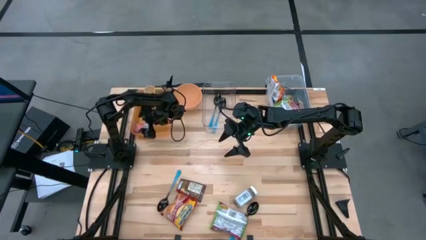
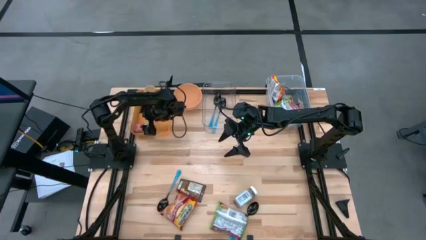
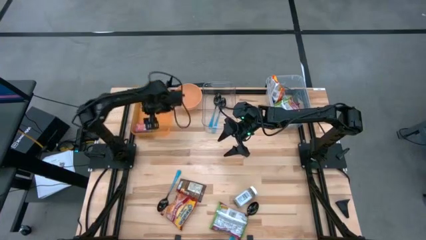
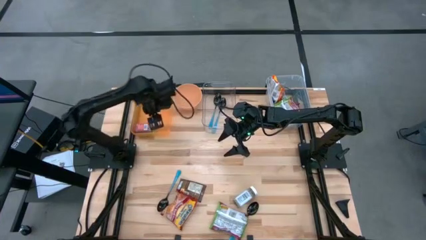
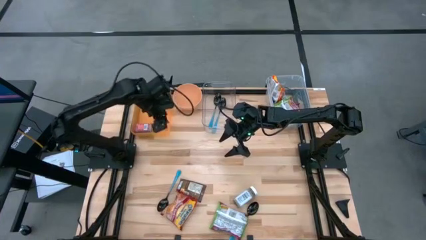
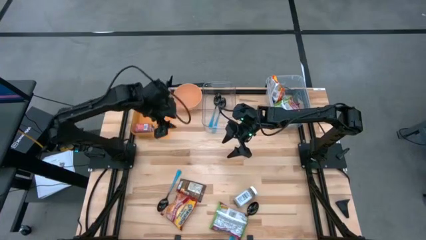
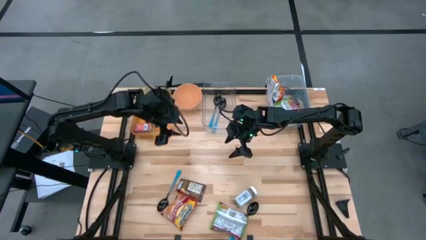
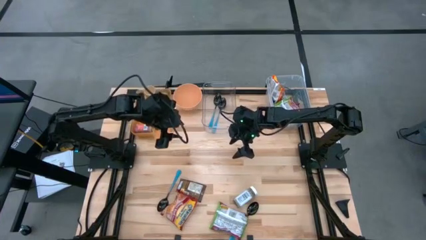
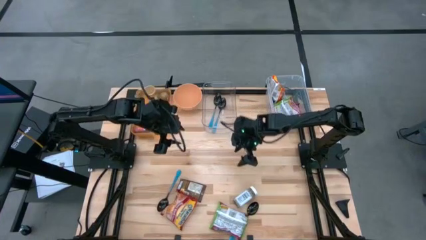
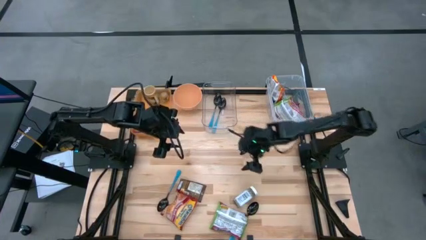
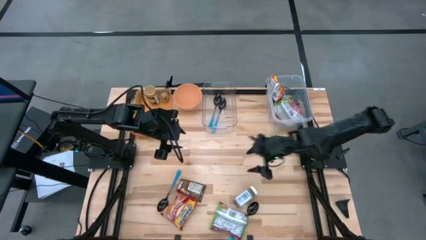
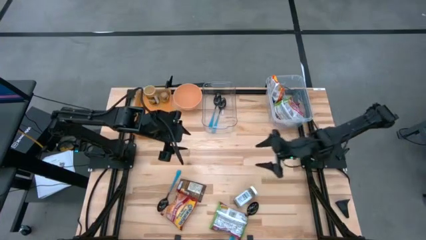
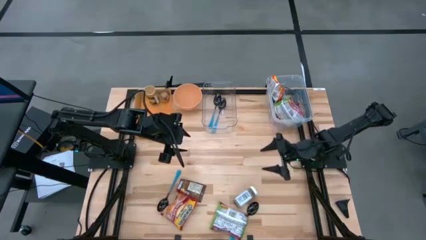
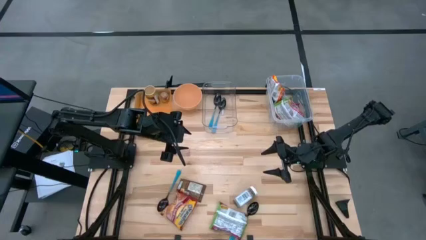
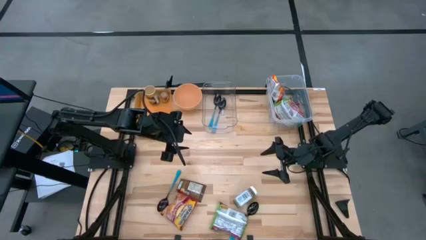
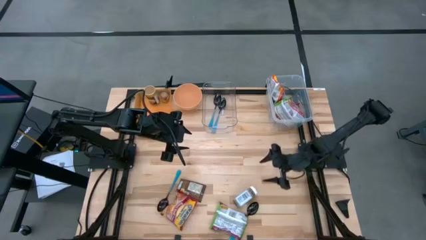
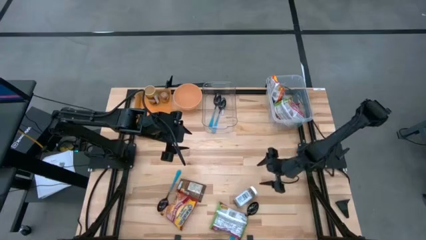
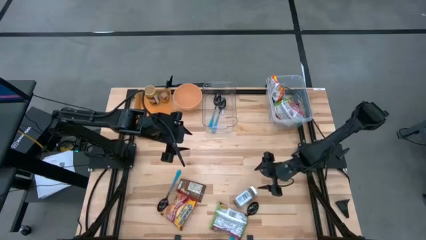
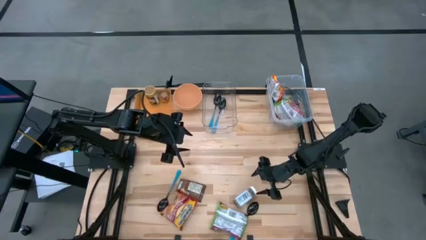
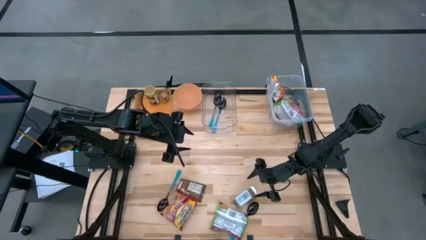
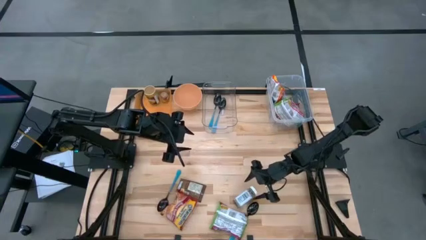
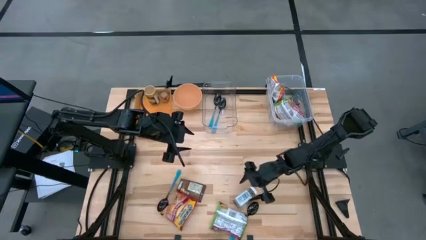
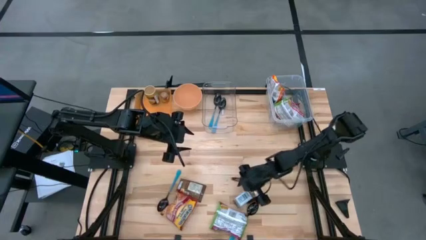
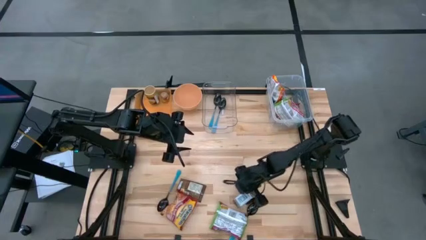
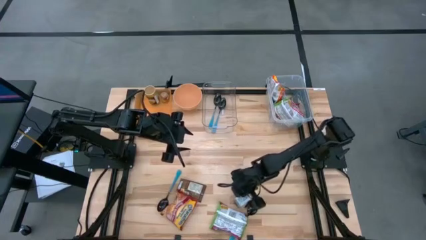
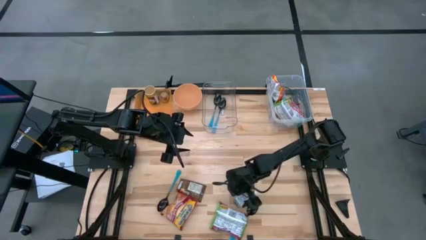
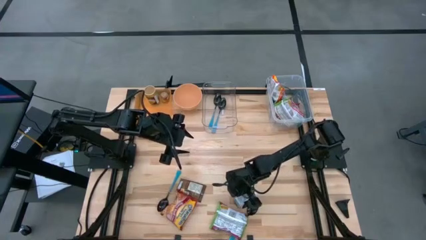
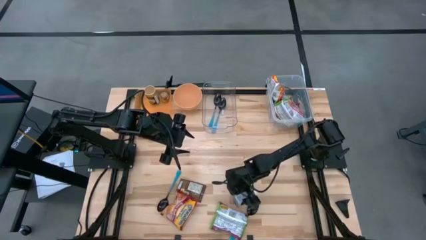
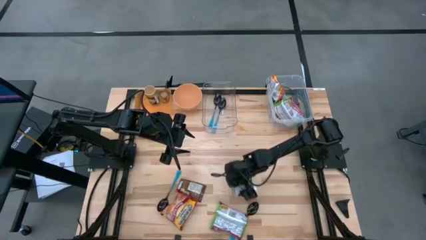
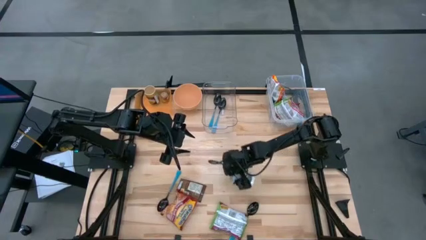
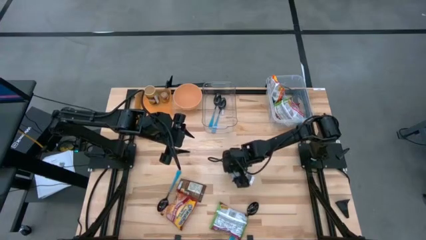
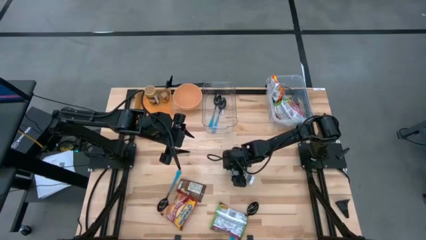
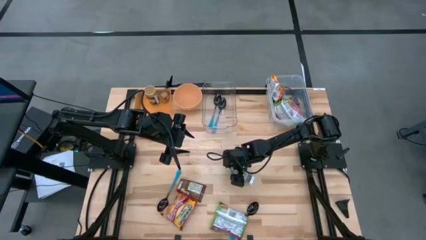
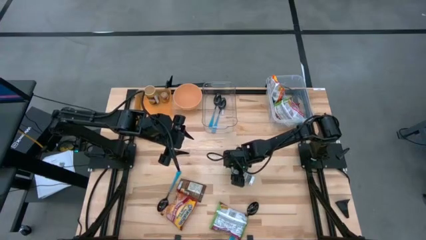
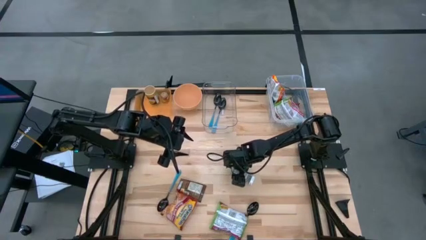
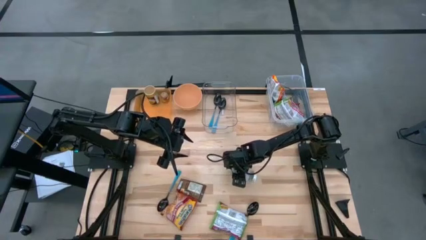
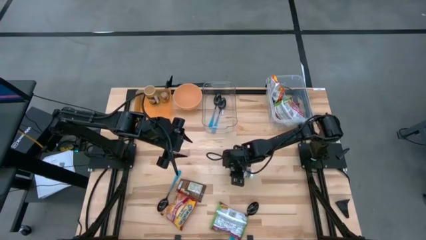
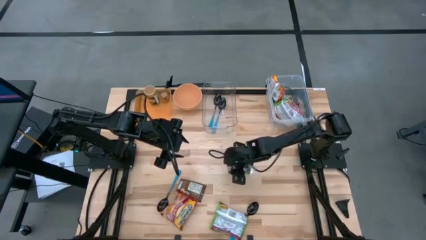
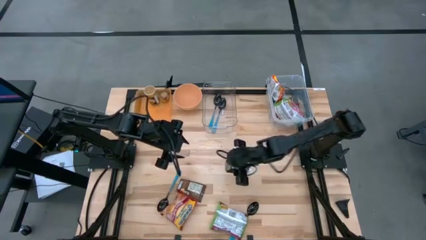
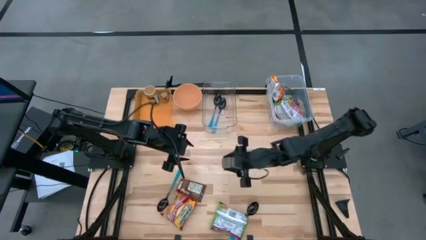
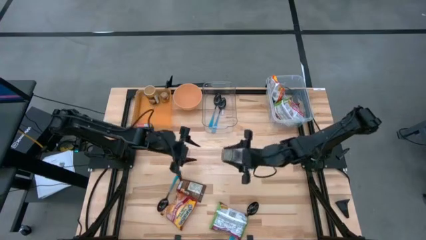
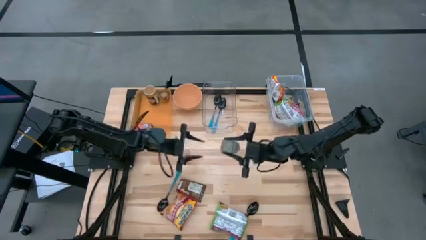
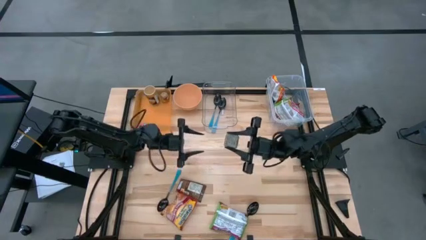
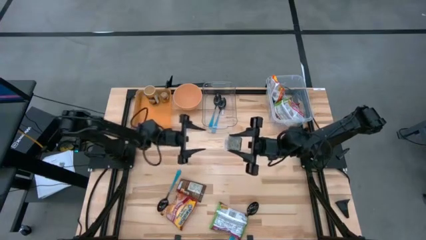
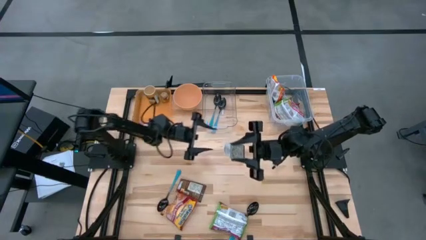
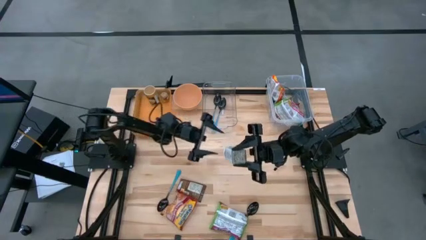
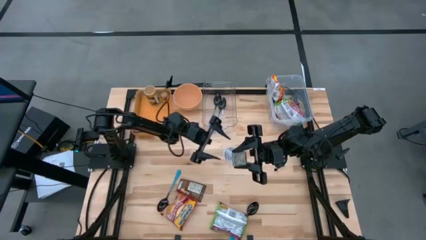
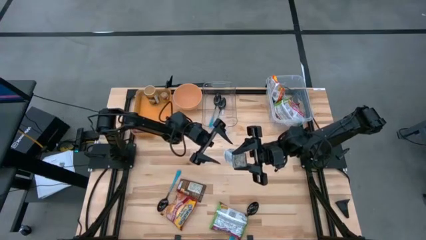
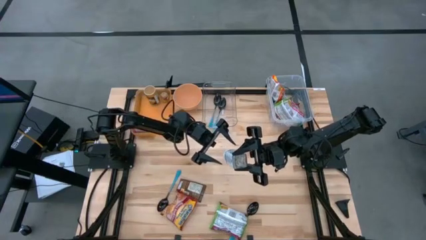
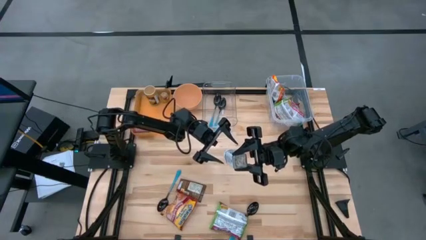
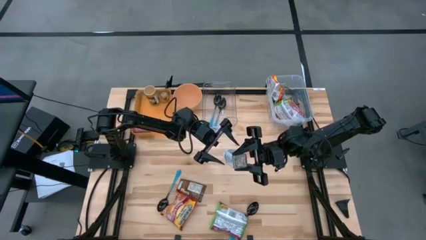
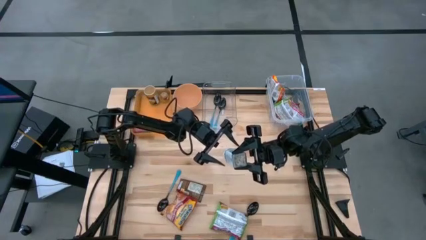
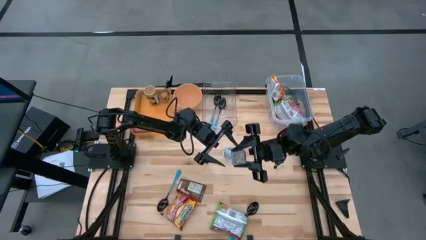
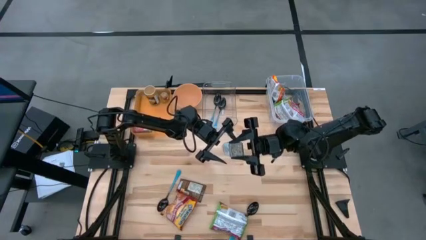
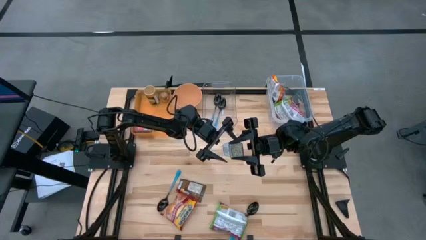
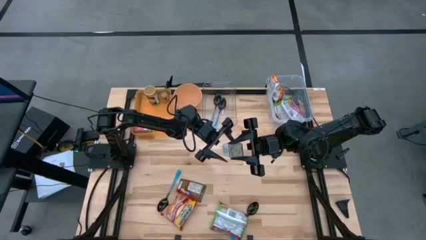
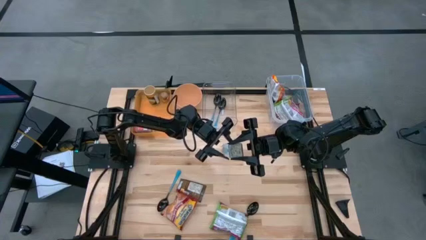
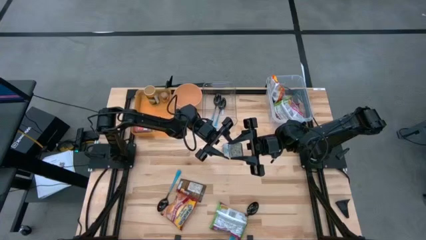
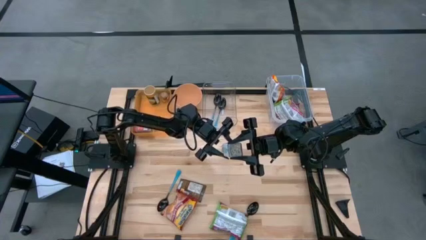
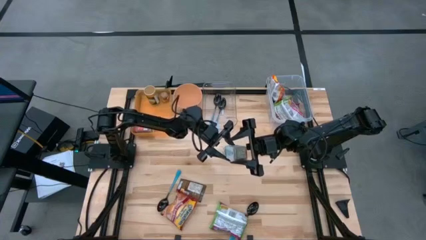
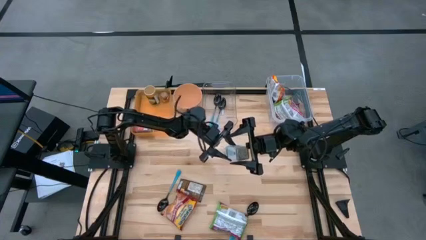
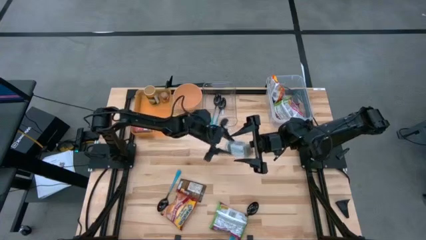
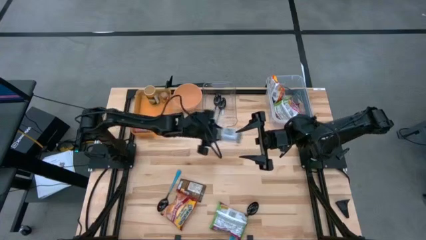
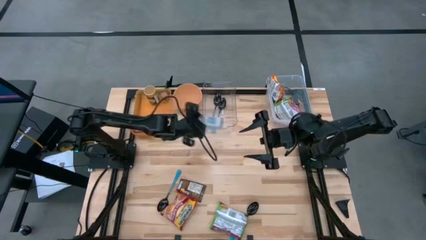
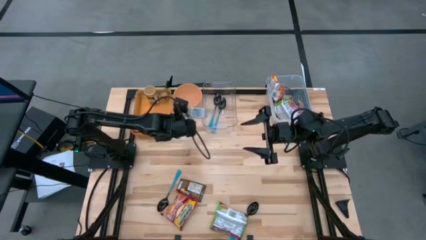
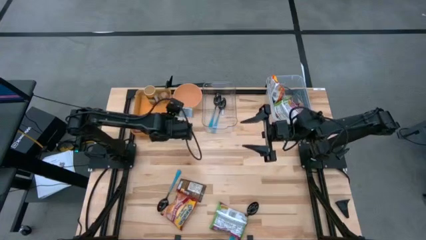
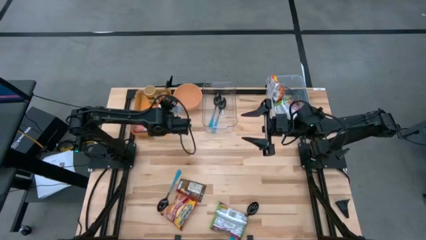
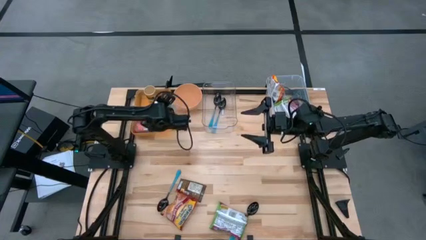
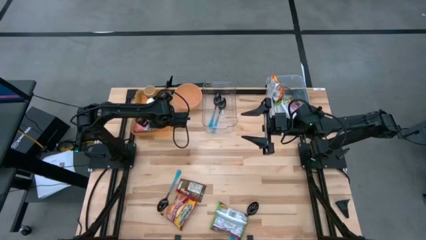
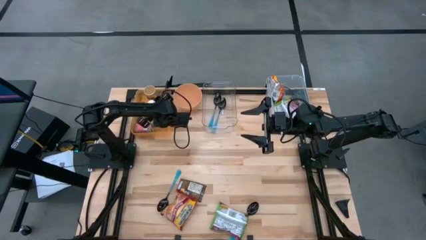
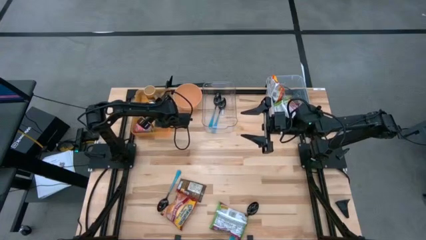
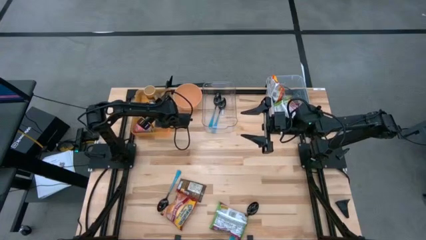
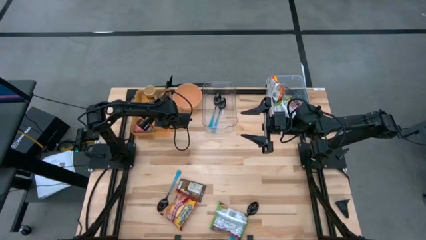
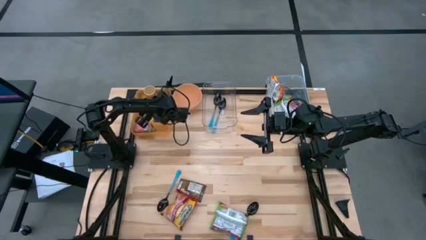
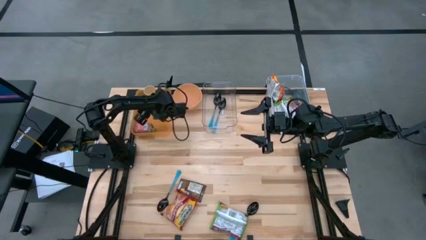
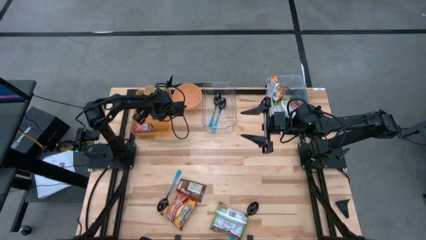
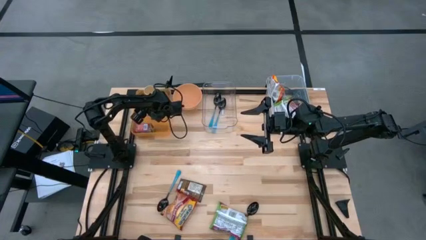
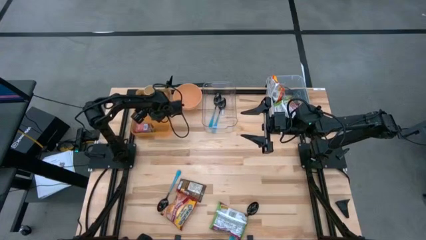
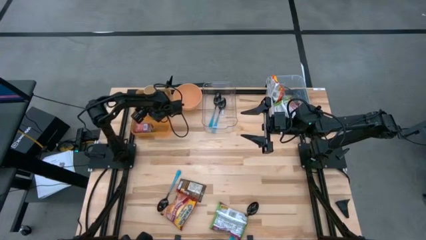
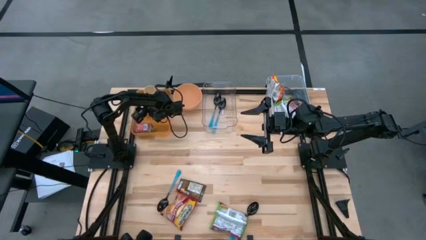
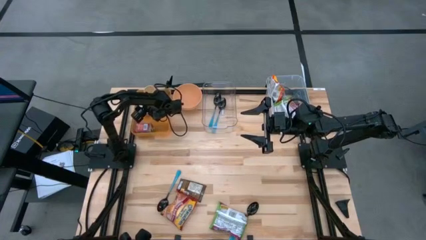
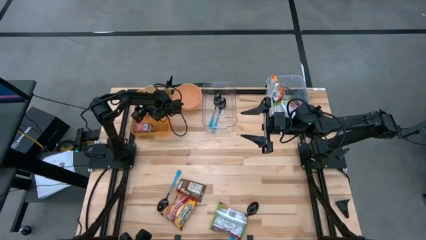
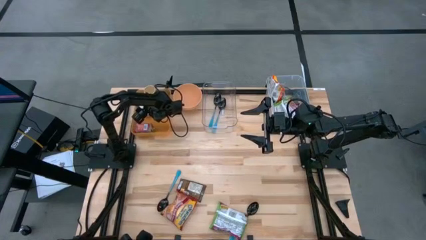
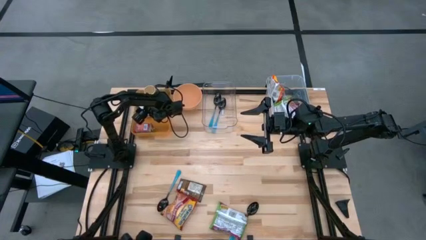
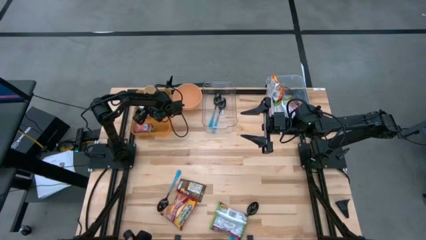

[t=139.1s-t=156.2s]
Task: Pick & Place Food Item
Put the white seasoning bottle into the orange bin
